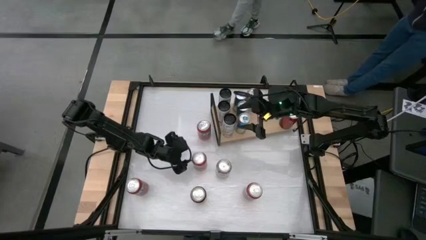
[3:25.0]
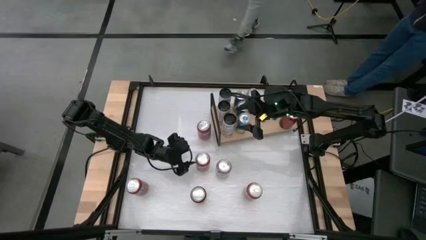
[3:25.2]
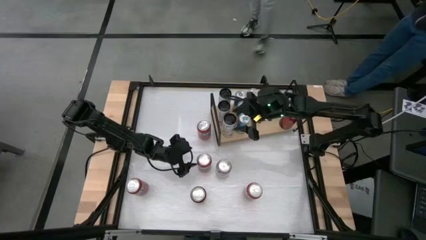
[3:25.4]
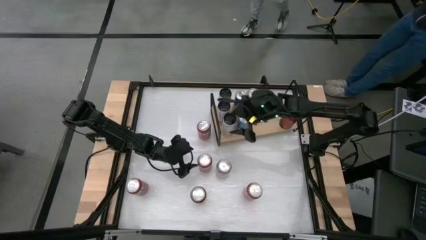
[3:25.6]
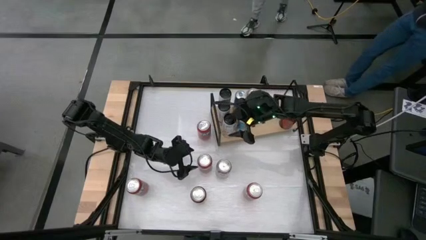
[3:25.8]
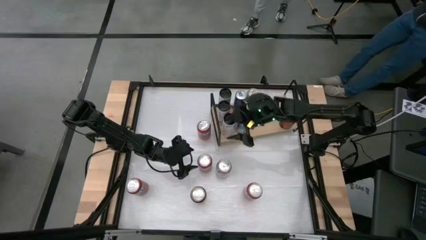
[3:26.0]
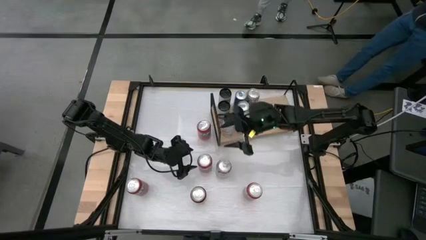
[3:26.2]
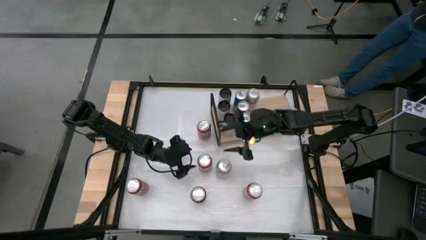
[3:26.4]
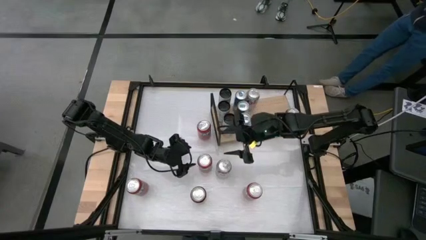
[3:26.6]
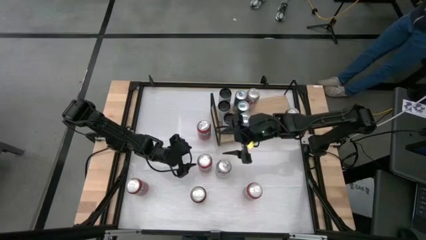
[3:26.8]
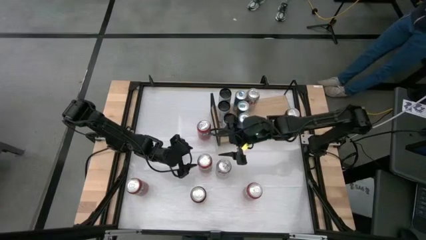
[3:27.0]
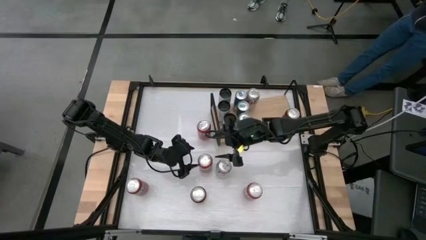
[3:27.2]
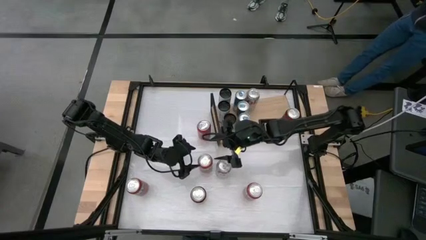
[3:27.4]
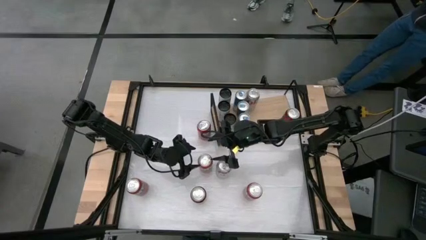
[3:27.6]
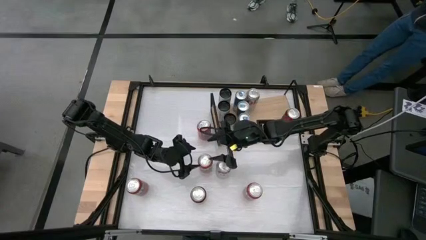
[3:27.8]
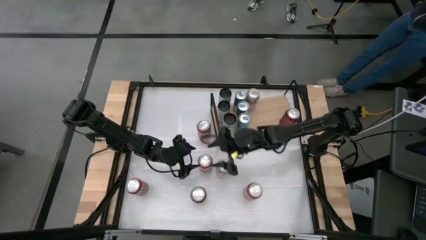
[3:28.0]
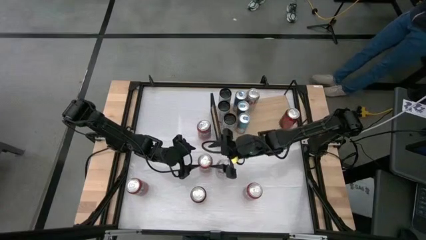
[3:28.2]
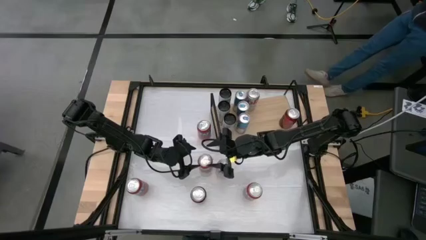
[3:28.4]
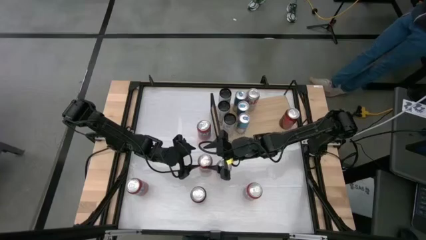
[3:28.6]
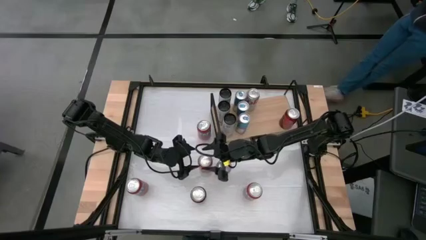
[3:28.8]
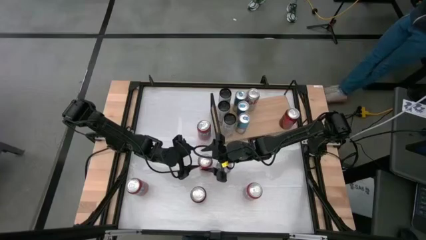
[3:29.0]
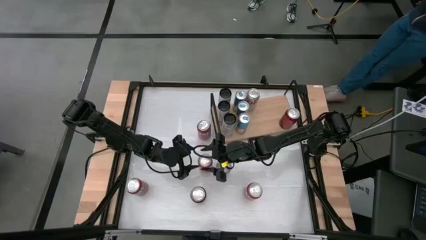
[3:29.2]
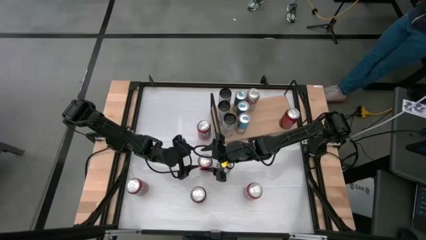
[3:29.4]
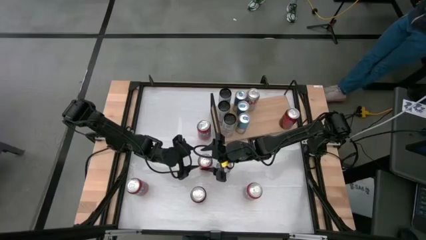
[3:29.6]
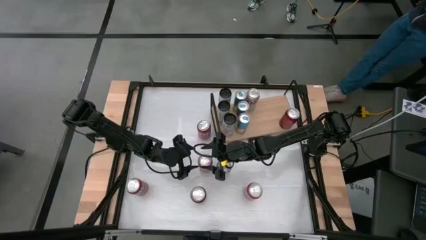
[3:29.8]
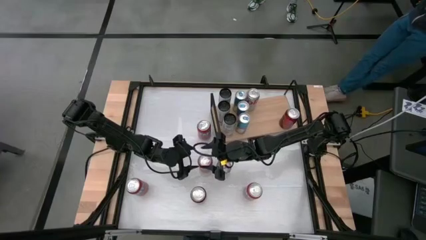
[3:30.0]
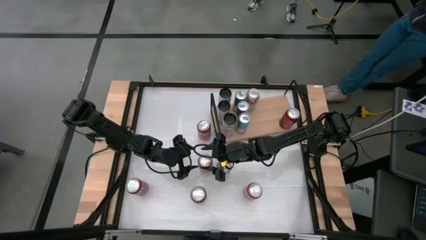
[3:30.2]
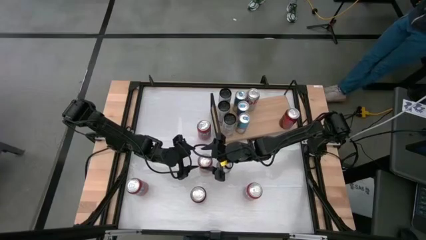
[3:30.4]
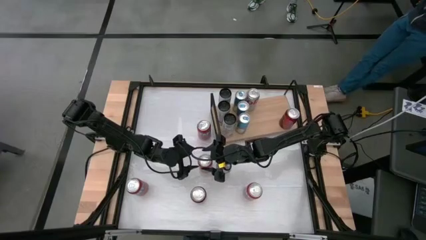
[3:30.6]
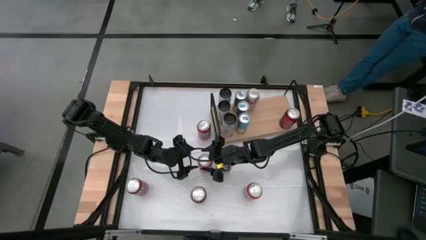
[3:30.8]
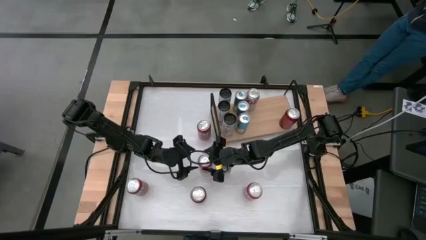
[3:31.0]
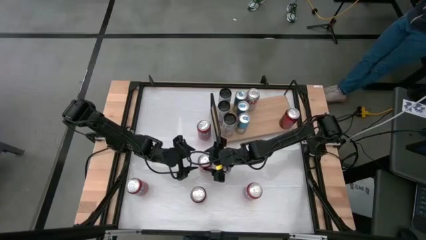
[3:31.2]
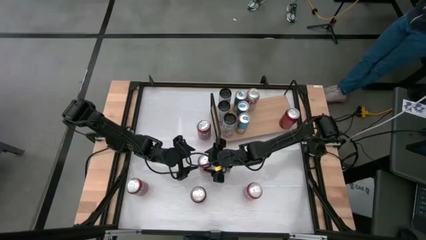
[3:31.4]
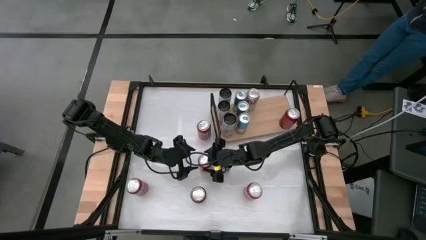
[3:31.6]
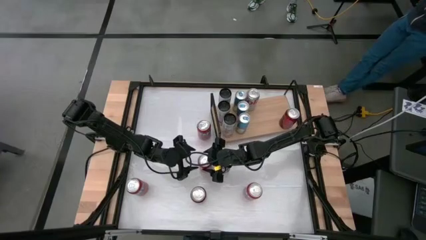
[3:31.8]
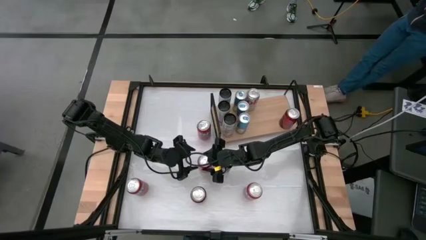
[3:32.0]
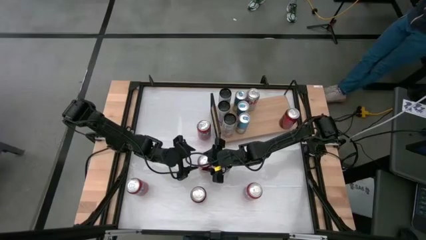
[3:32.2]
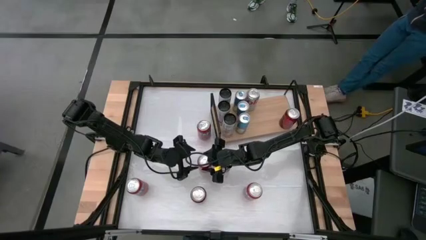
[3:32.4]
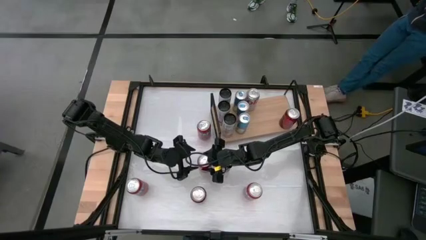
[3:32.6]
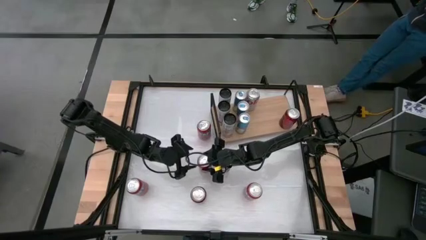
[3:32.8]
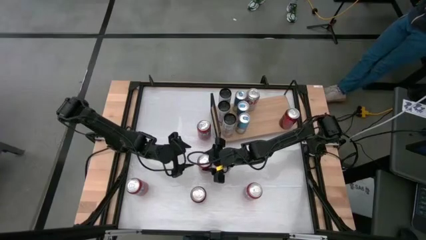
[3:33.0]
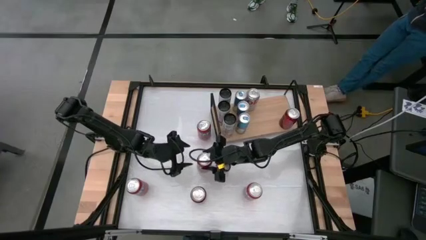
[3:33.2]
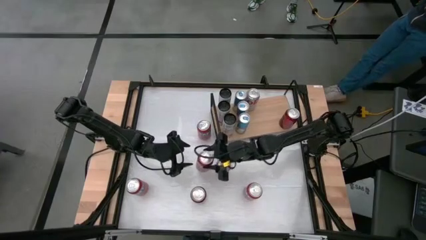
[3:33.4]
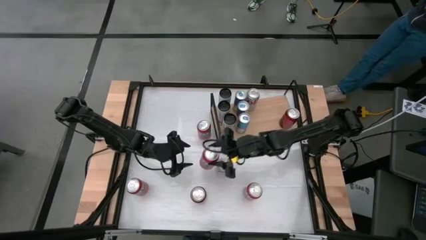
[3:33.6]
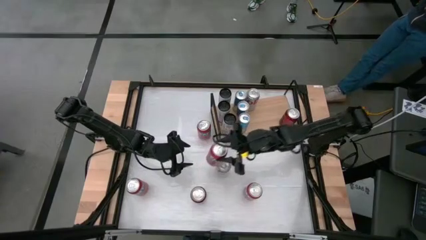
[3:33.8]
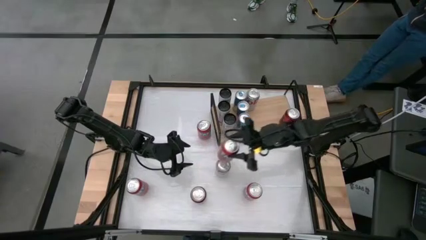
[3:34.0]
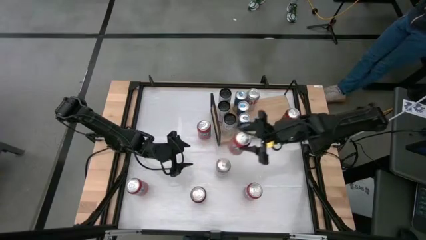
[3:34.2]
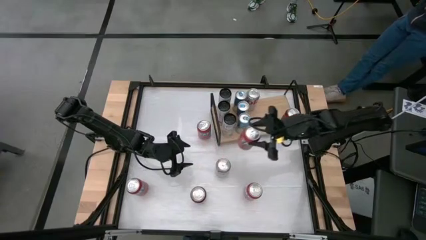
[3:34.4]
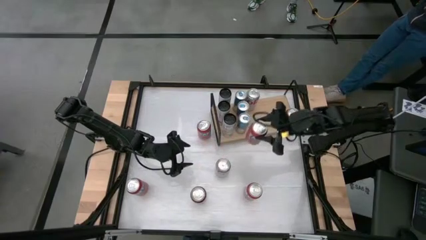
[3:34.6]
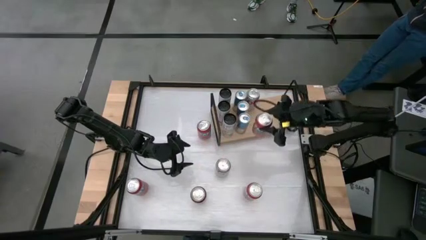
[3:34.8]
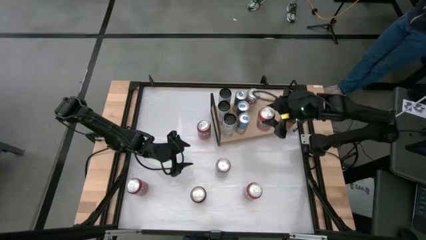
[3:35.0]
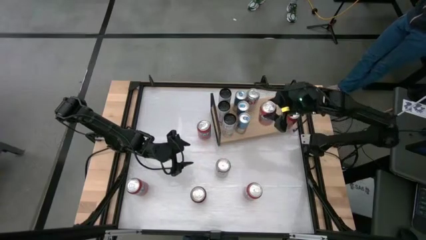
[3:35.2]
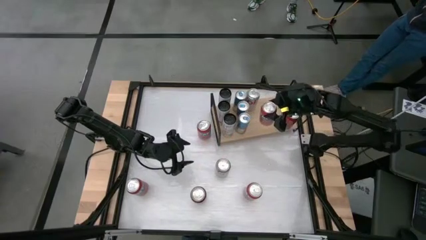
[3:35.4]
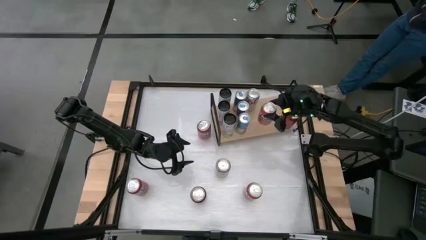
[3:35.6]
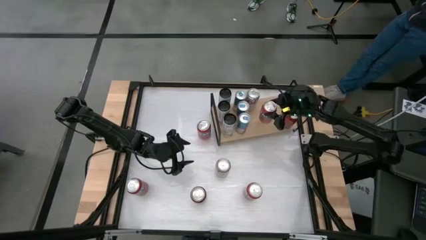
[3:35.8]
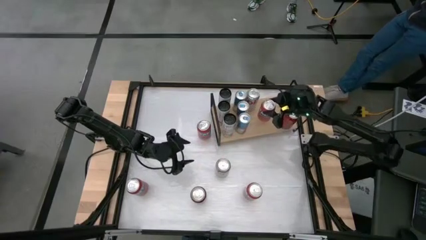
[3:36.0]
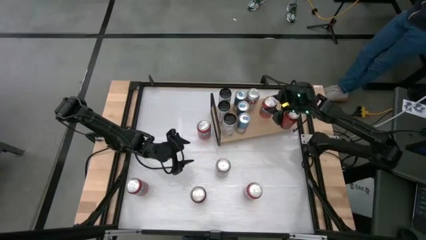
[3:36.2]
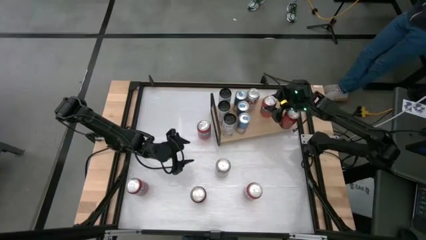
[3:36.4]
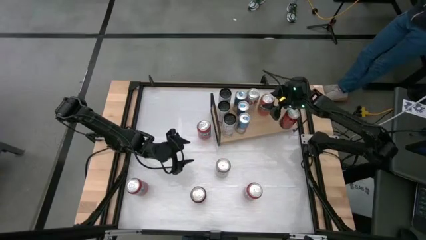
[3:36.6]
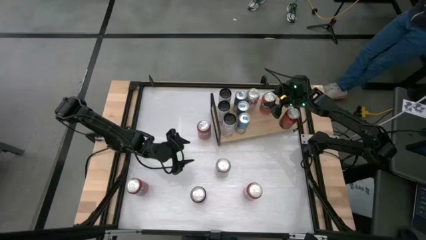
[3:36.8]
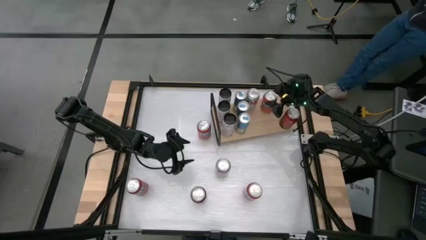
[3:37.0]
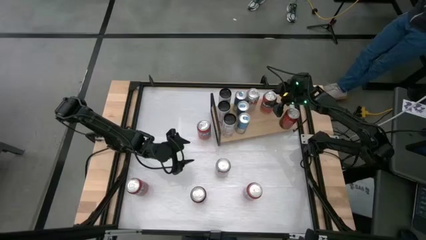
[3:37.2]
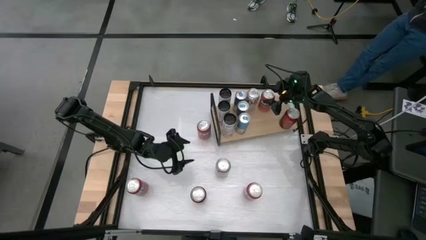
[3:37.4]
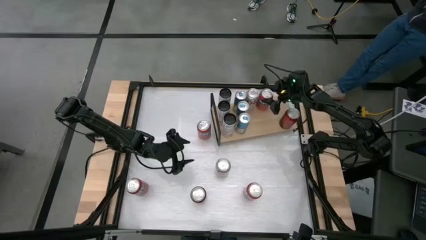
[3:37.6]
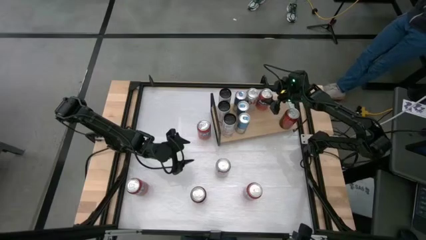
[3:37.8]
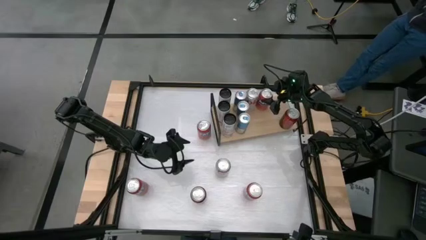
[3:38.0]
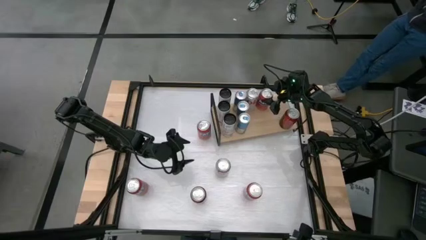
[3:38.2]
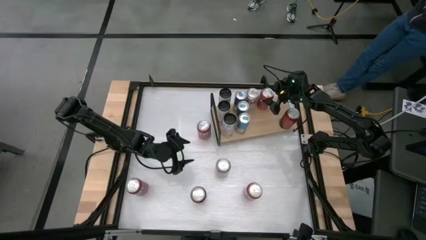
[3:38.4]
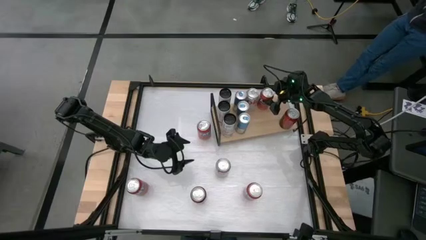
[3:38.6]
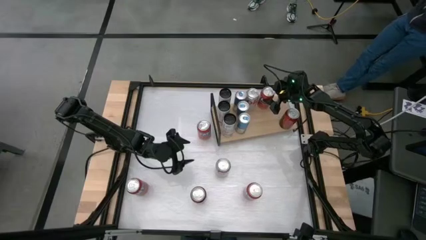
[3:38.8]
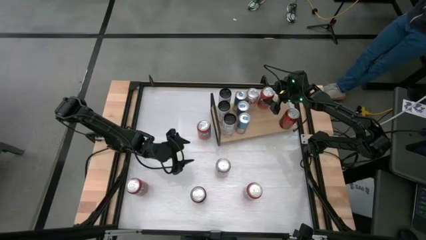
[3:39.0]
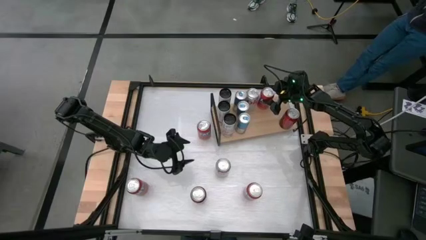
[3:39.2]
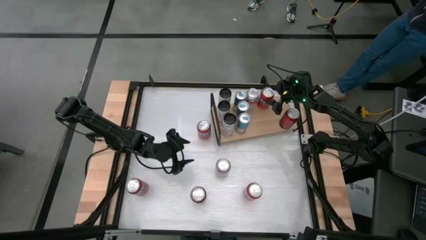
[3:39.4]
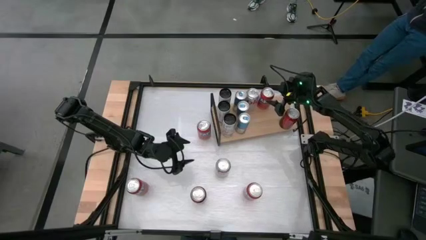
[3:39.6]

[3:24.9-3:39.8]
Task: Place canned beverage on shelf
Put the orange can on the shelf
